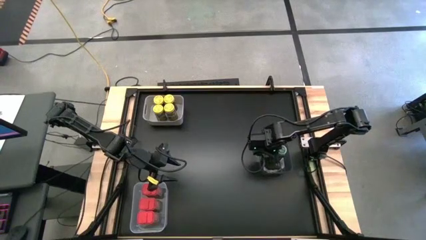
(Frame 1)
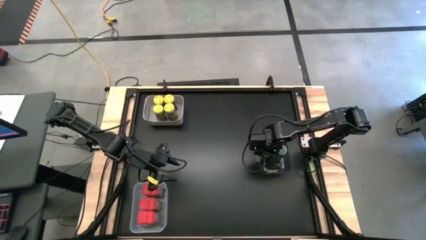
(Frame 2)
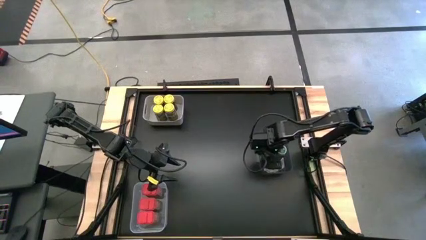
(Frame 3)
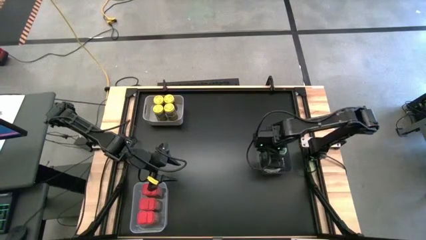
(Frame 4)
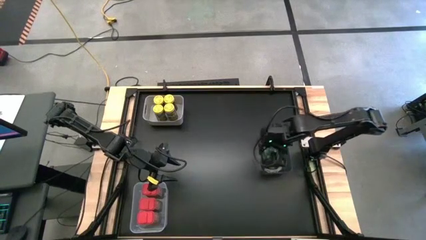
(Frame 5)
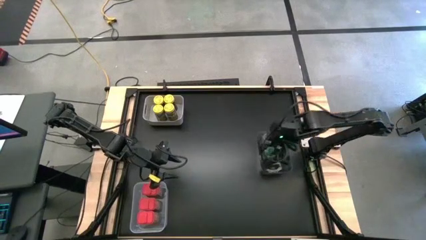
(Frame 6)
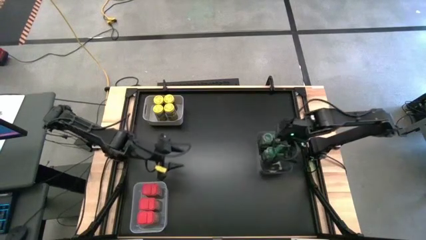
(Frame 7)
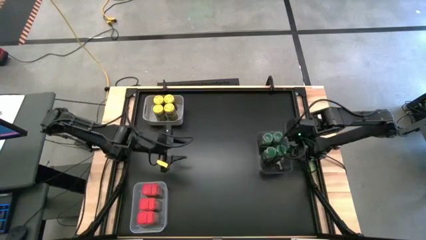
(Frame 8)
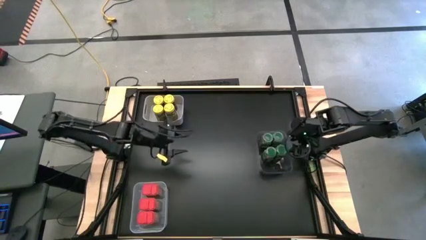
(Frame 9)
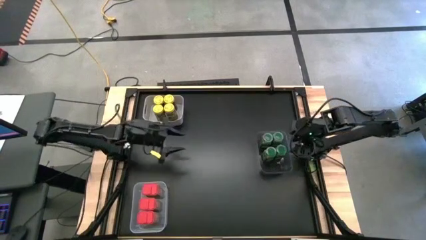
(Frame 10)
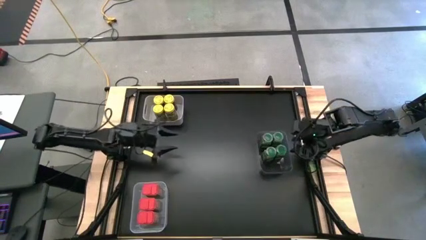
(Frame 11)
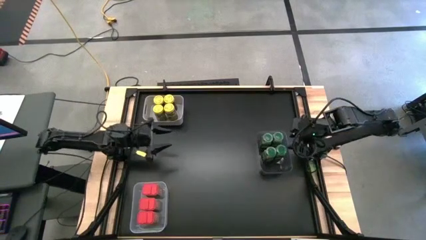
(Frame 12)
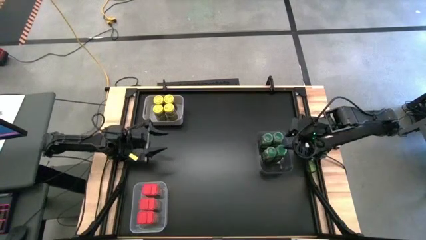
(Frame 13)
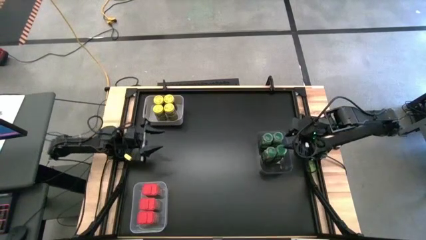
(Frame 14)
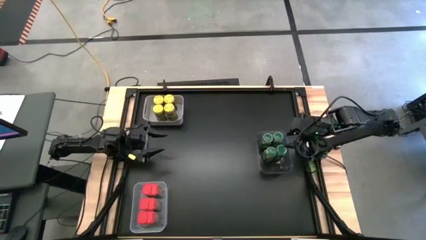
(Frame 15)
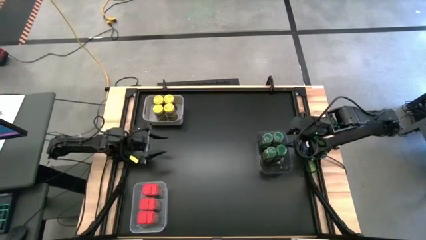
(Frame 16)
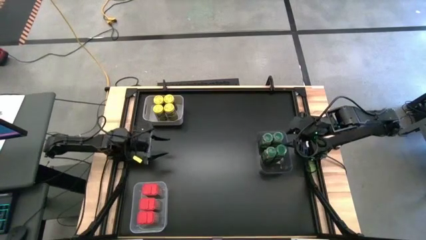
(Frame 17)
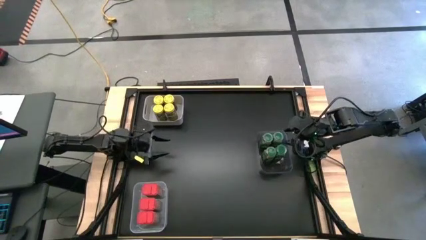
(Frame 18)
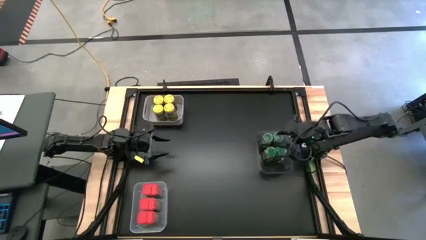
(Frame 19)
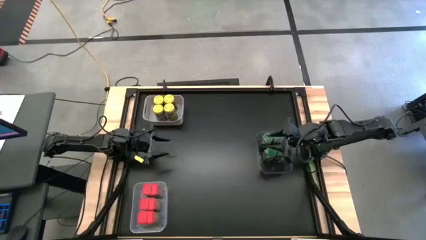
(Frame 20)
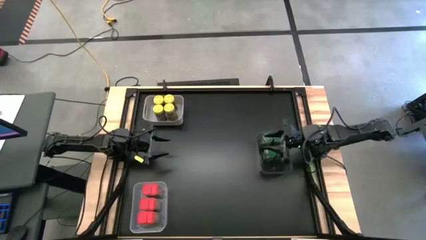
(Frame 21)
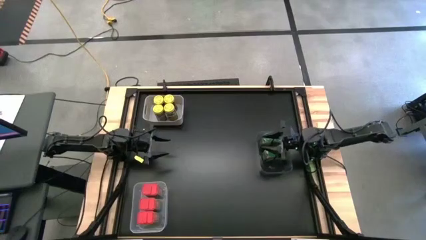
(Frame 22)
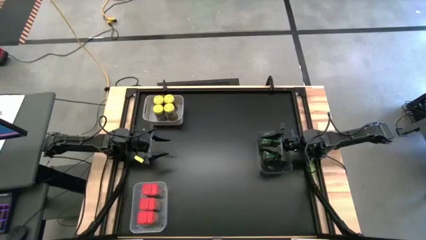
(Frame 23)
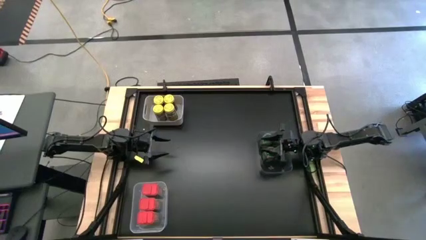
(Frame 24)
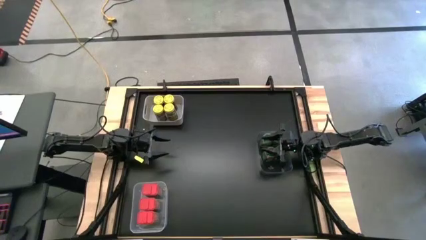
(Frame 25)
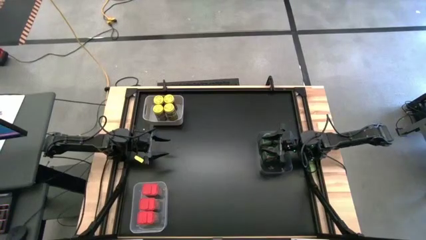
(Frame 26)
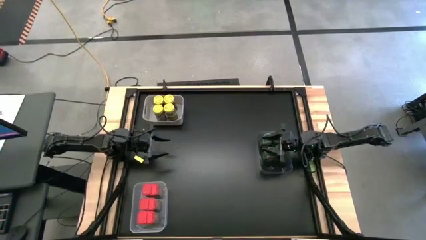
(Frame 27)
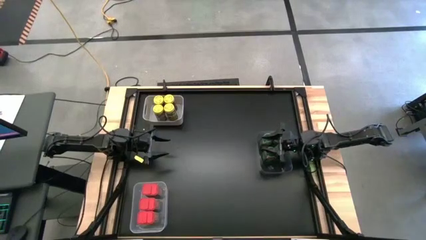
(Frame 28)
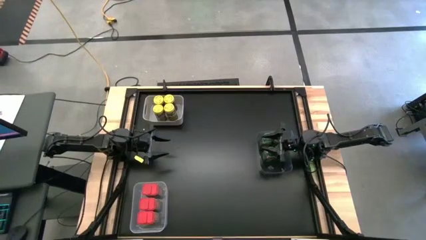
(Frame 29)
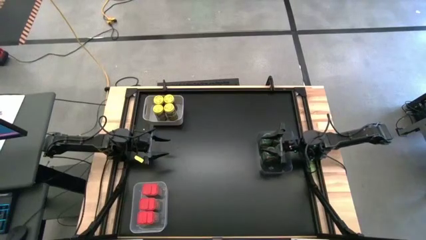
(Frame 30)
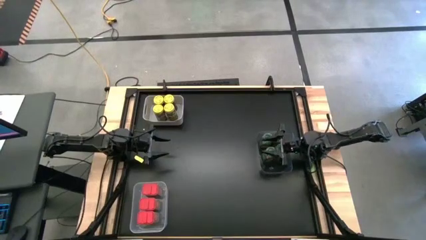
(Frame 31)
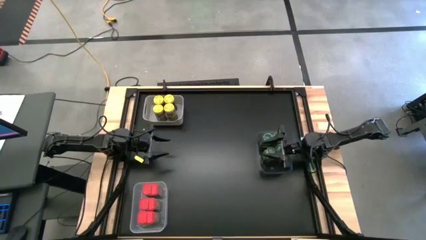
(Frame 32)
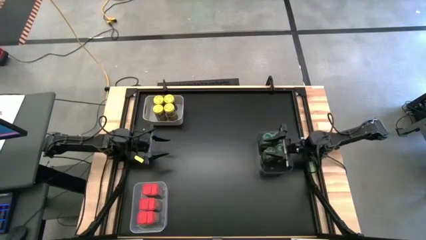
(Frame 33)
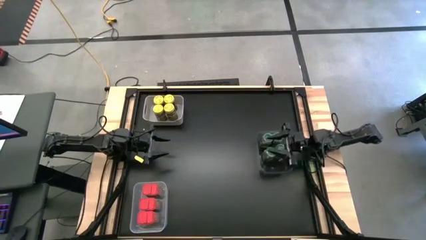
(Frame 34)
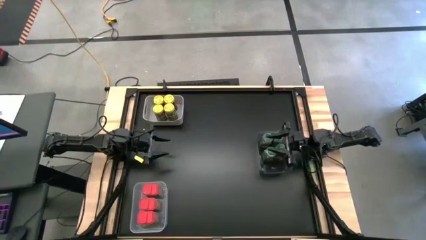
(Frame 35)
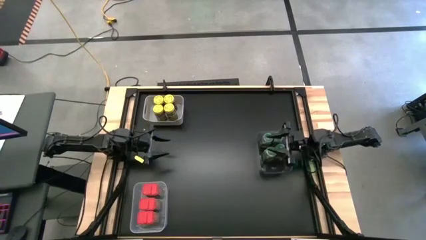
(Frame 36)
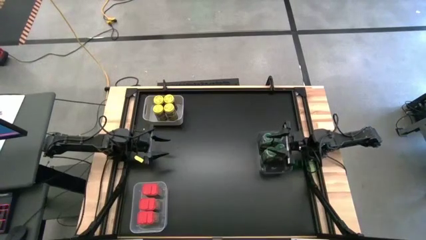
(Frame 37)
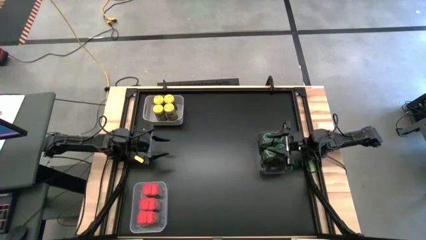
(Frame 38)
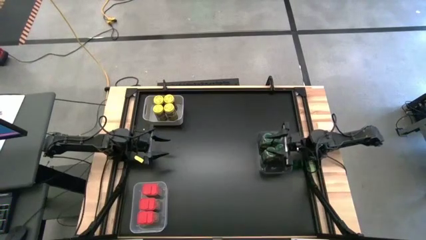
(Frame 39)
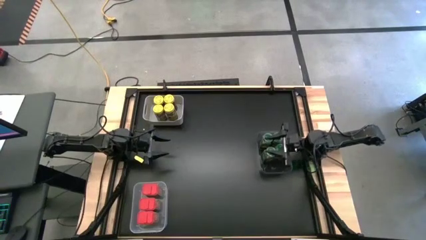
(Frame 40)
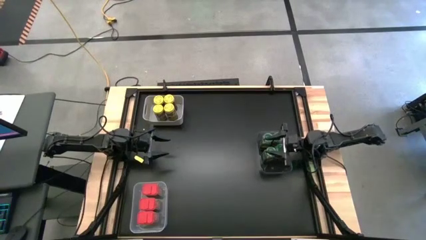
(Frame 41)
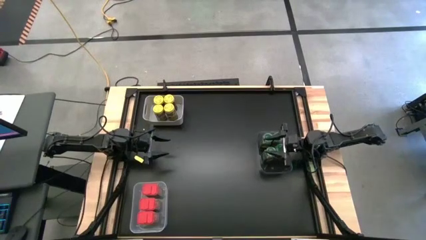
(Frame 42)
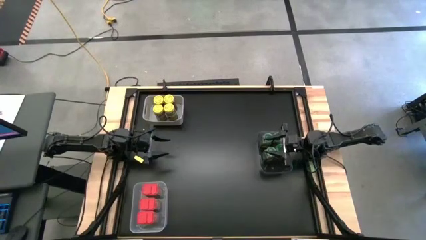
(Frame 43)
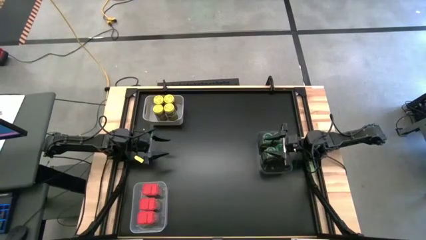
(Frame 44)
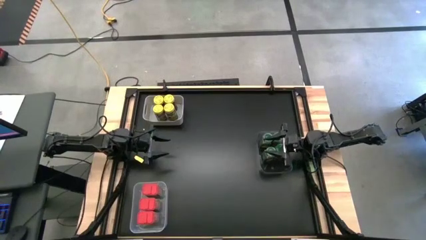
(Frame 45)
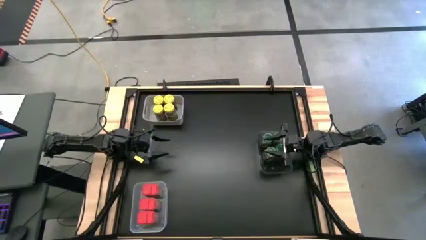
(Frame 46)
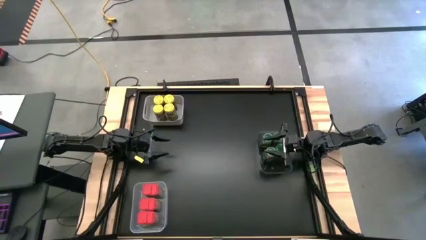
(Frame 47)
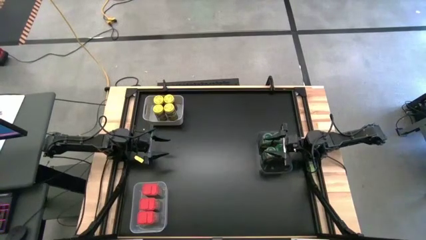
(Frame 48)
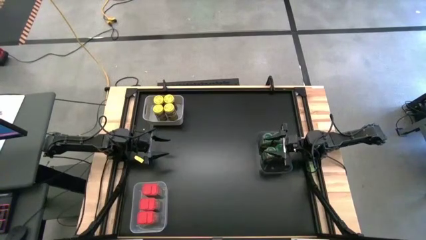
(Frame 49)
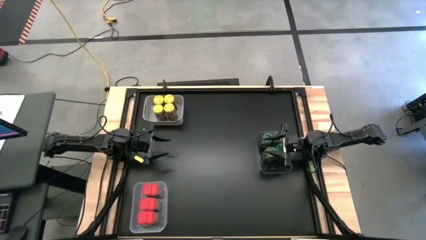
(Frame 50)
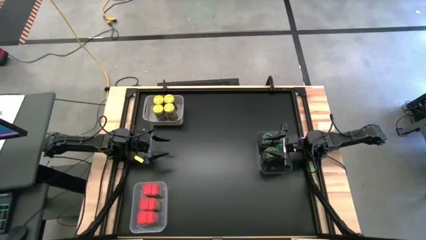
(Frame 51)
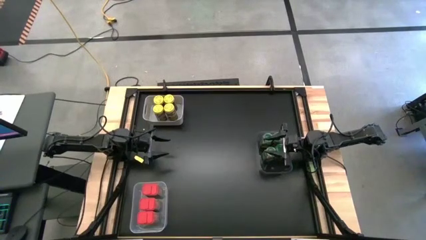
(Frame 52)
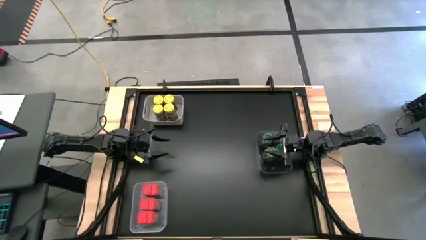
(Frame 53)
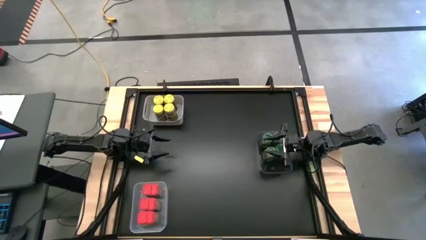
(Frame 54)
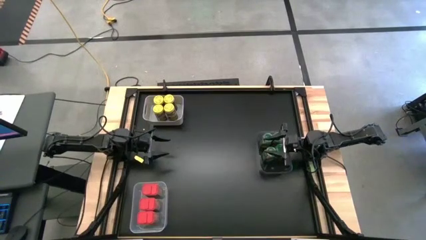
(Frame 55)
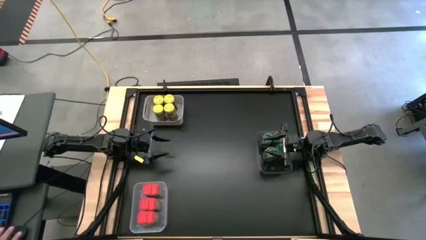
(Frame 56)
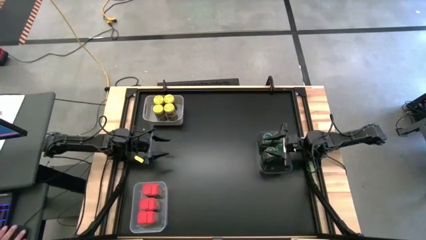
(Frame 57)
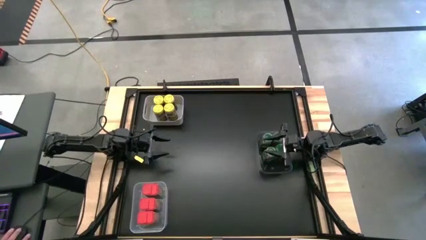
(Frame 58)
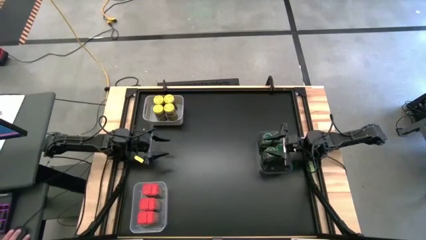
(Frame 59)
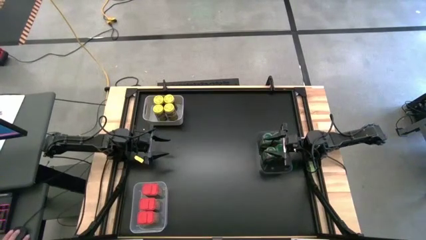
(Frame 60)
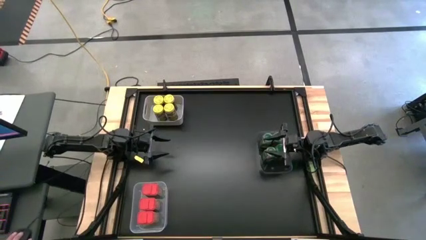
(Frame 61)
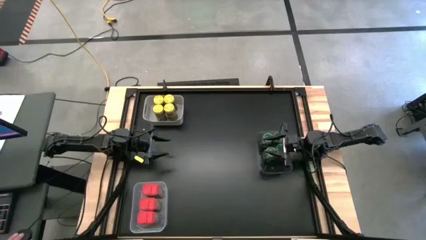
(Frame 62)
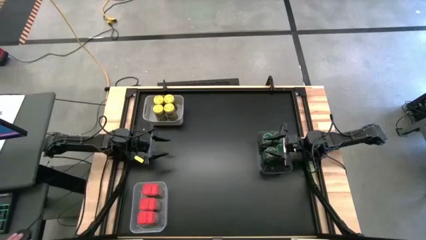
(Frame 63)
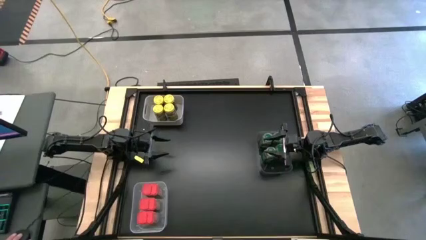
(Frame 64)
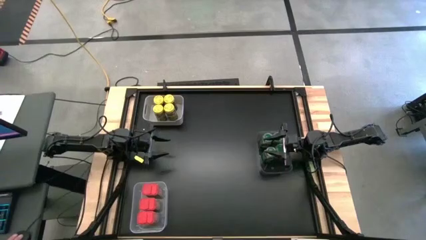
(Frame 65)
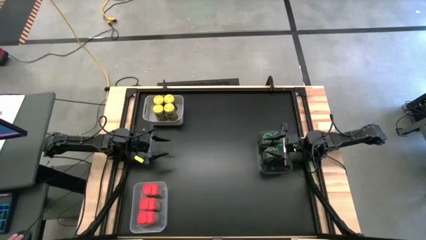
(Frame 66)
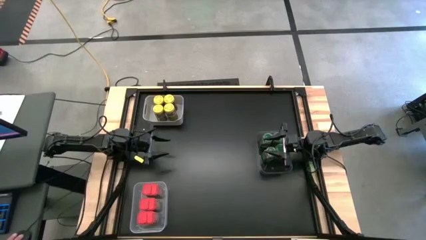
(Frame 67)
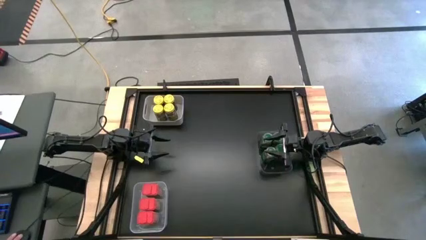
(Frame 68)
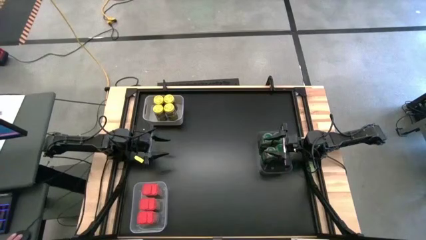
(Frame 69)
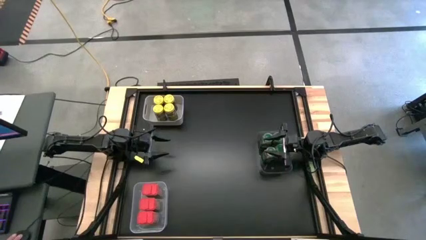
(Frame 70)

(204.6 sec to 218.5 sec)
Task: Sort spices by type
Return to Home Position
